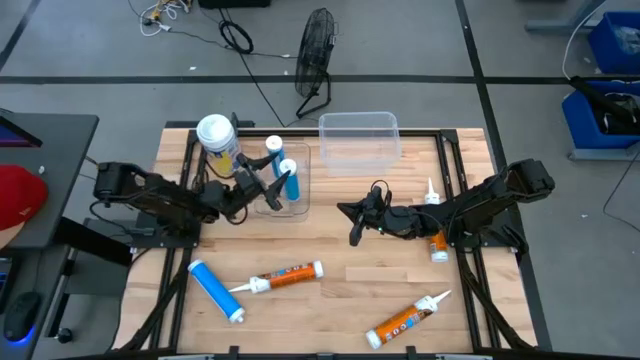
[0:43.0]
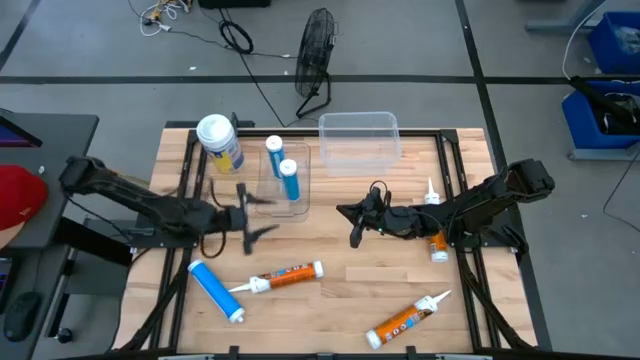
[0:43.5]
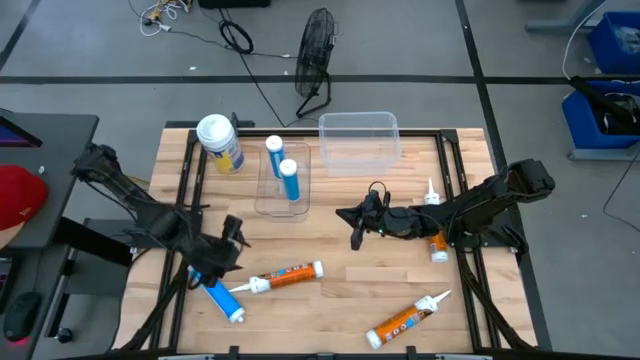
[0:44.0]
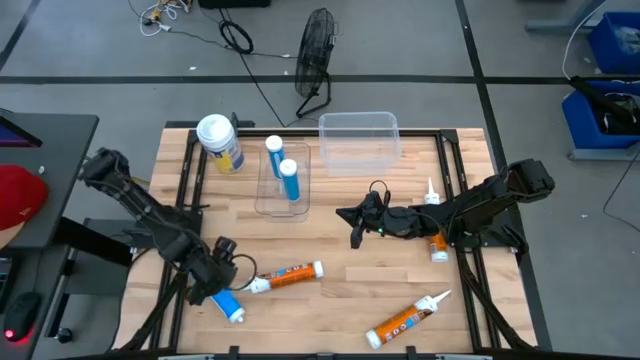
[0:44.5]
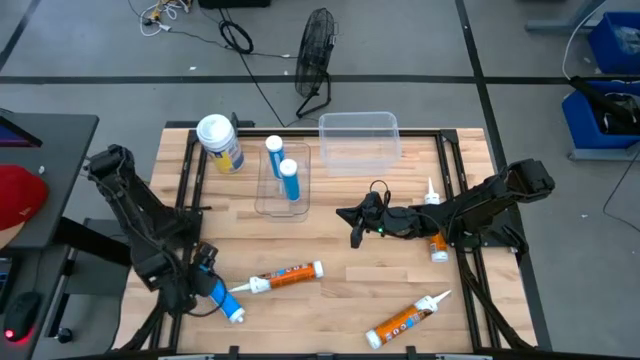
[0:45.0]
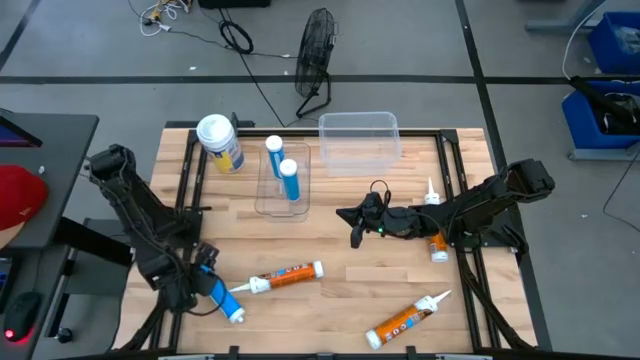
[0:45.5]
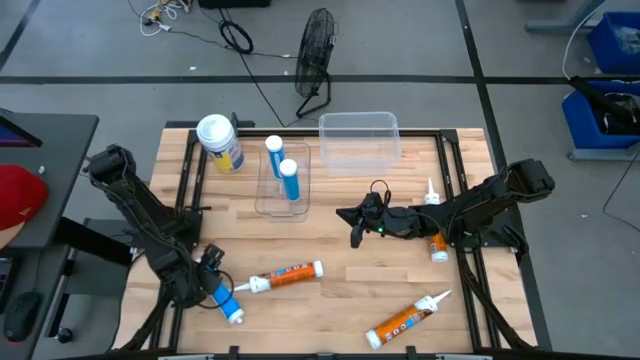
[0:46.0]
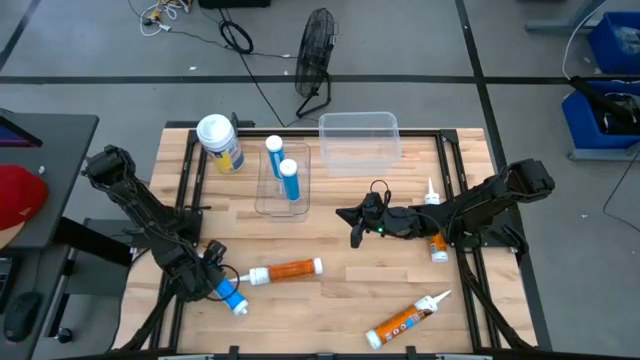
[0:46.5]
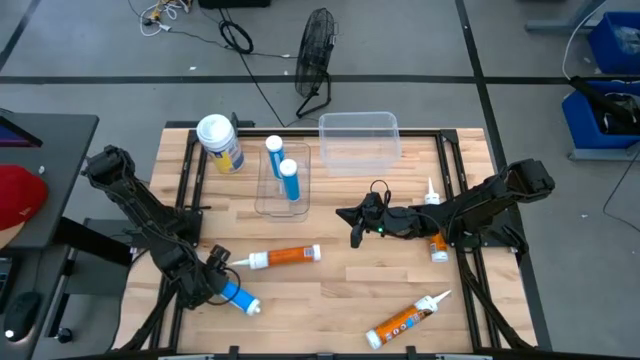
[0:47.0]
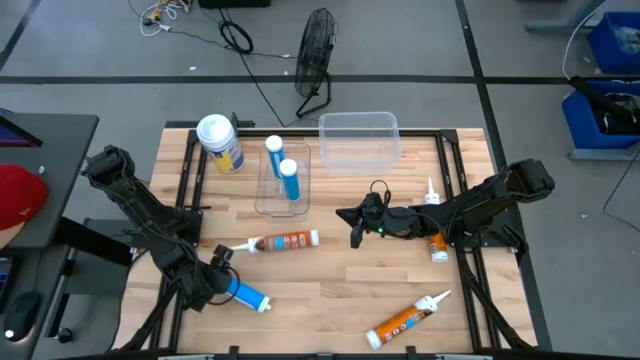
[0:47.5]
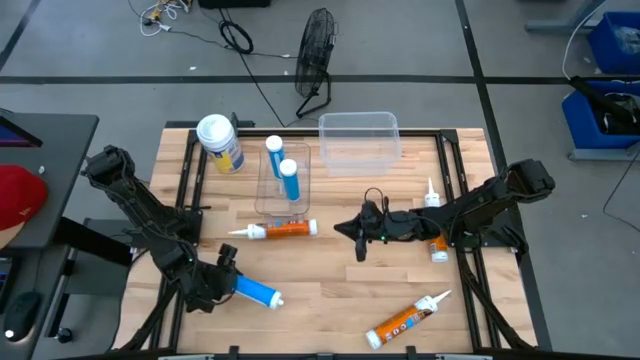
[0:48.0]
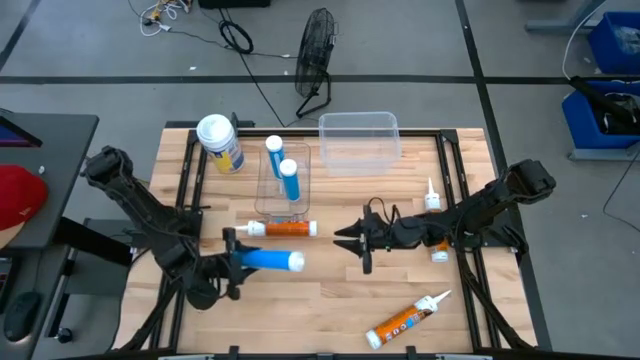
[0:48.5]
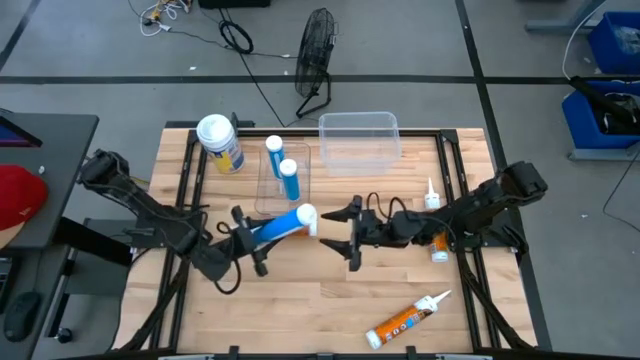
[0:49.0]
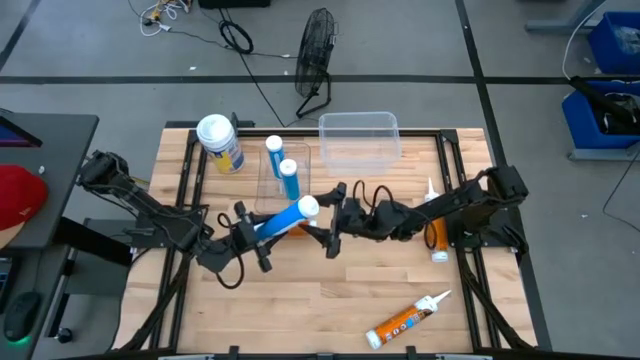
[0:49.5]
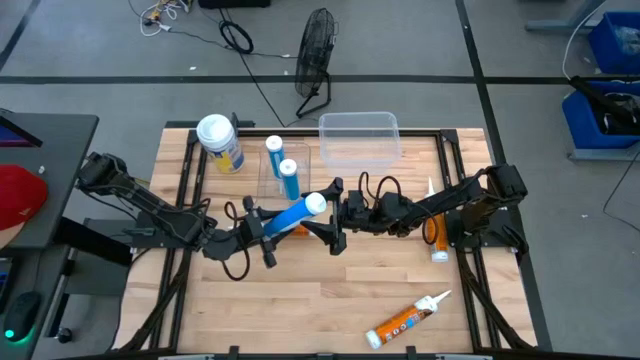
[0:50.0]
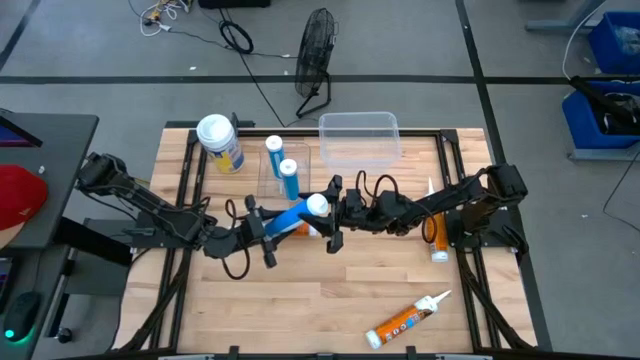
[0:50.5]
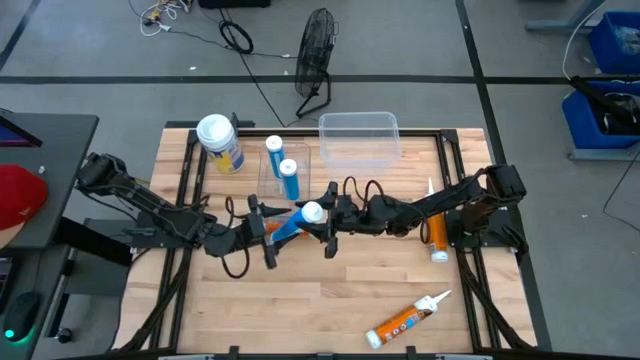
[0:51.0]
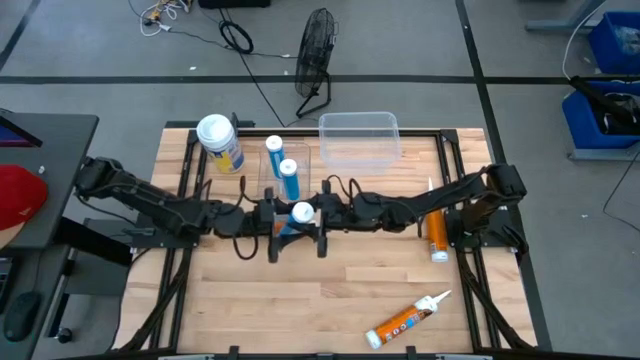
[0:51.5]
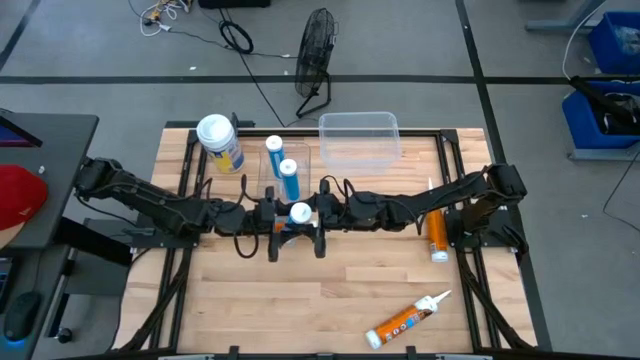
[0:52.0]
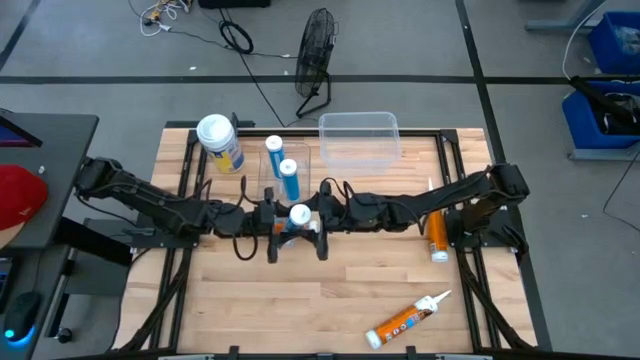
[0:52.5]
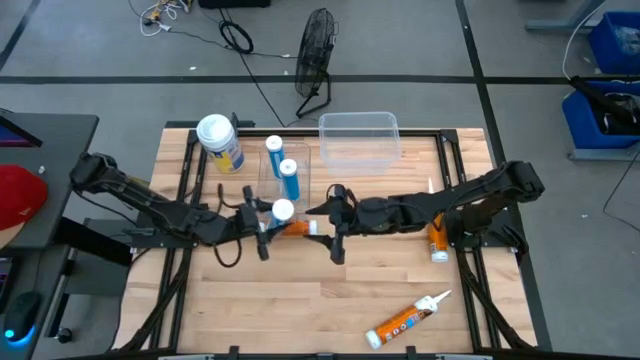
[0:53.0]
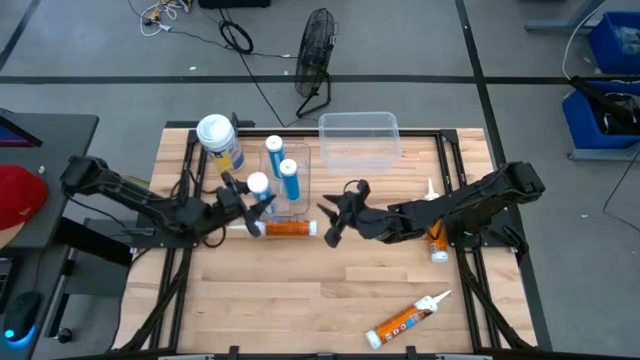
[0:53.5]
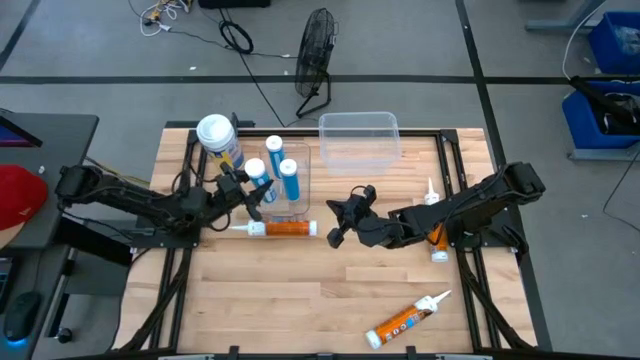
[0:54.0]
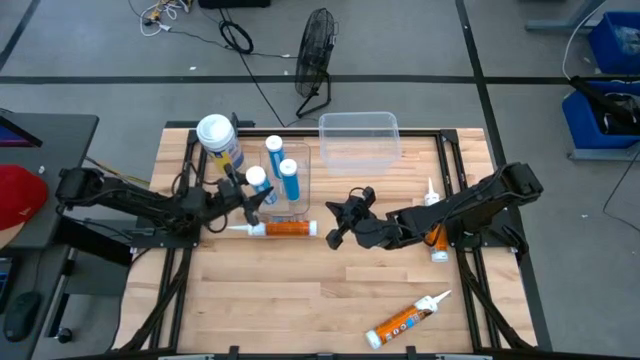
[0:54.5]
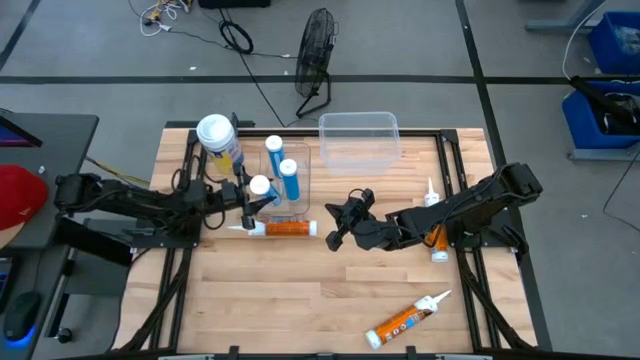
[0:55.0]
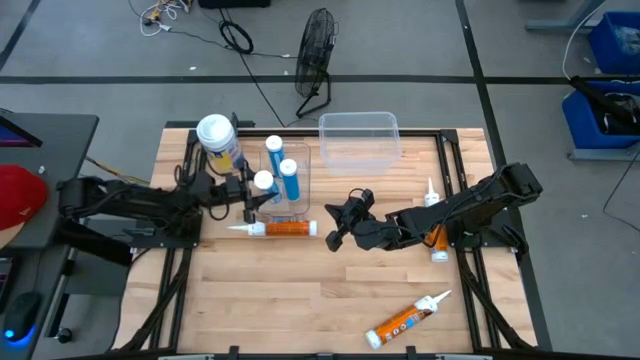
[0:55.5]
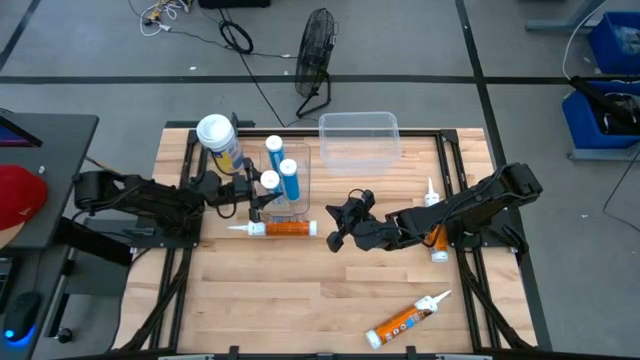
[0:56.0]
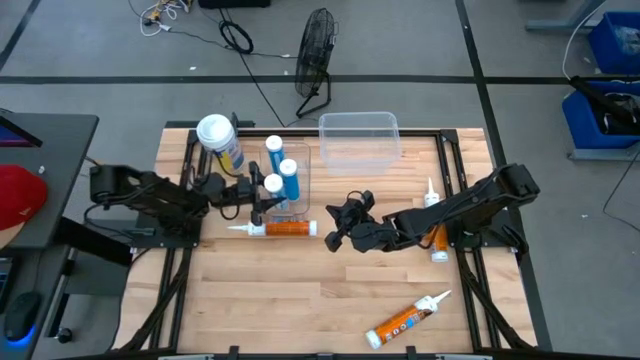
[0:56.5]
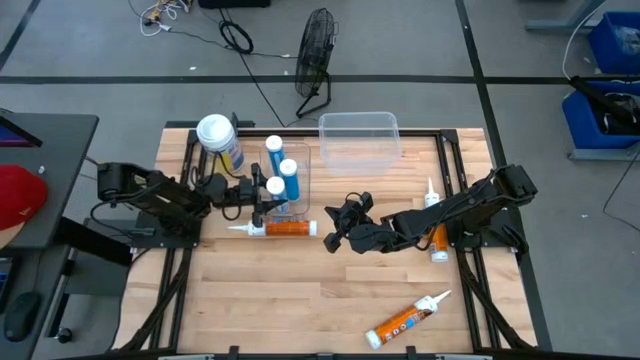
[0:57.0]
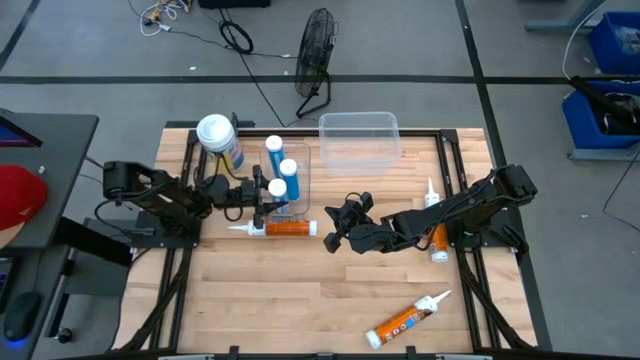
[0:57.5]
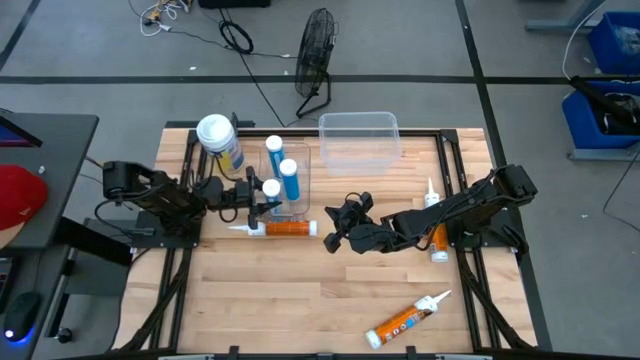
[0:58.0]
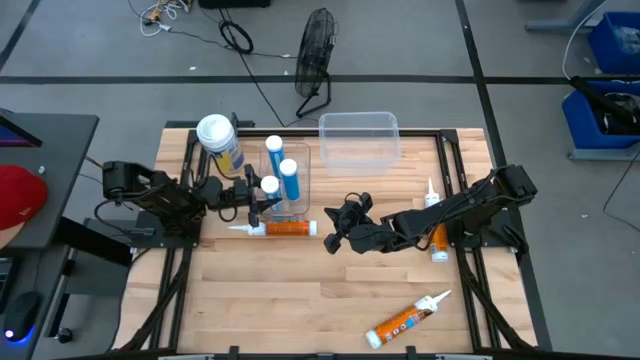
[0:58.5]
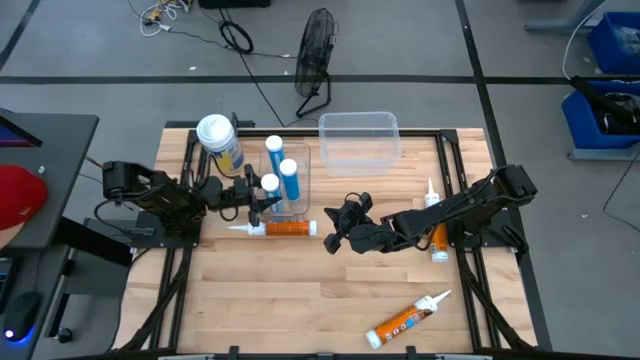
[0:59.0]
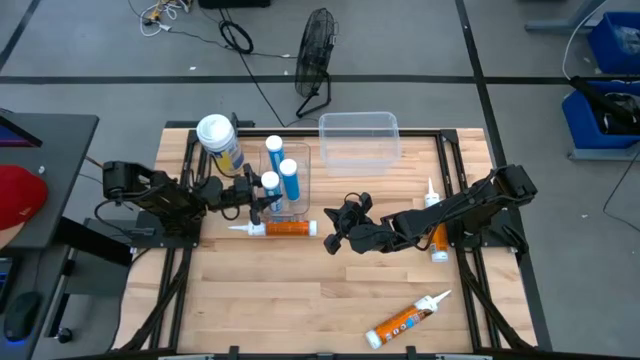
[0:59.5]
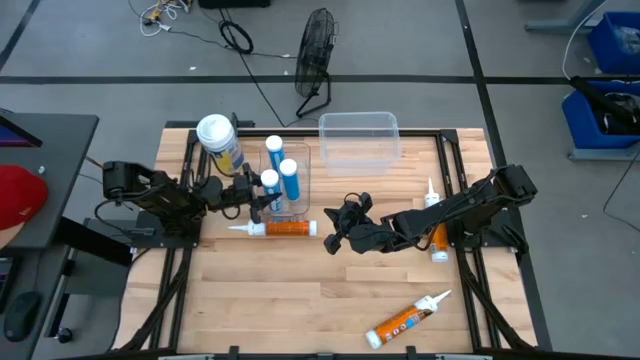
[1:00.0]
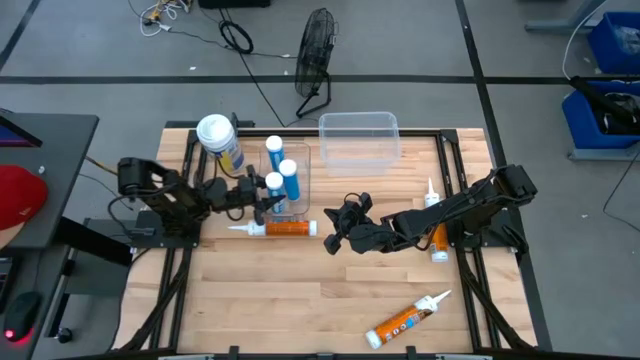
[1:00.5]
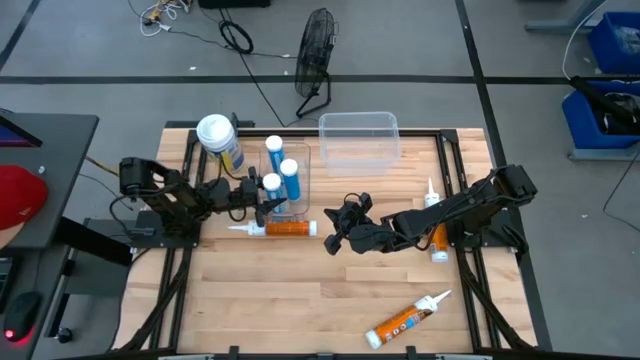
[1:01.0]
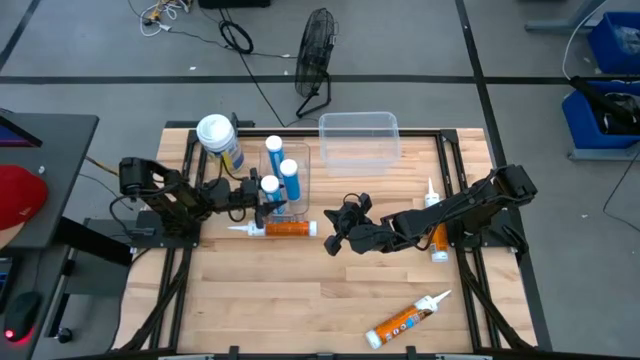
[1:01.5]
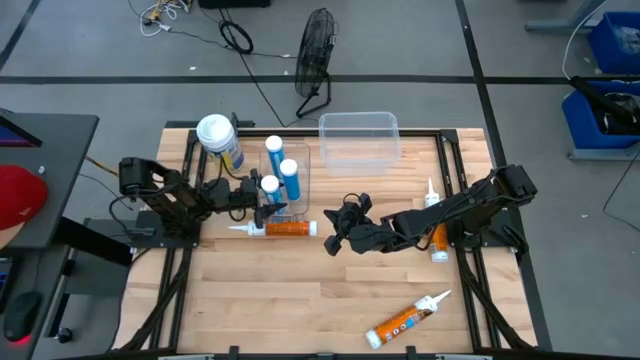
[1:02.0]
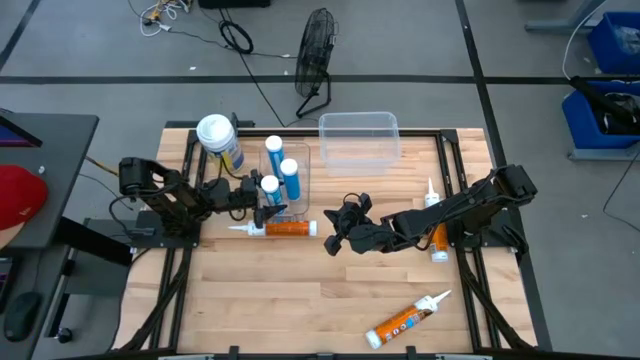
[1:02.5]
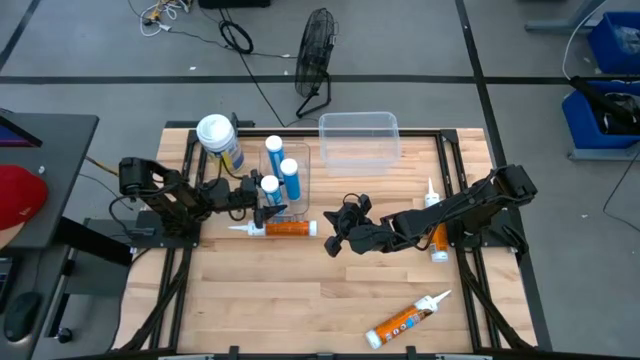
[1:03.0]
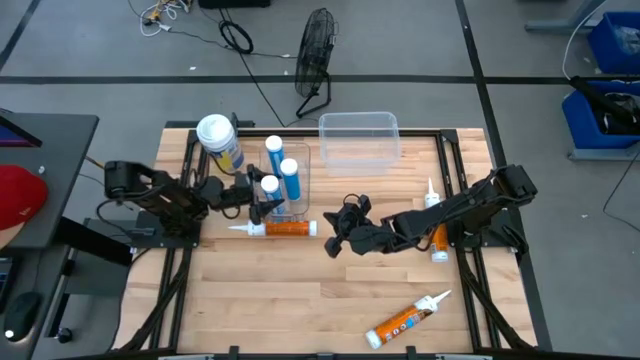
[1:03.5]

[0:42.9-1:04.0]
Task: Pick & place silicon tubes, Sealant and Lysol wipes
Put the blue sealant into the left transparent bin
